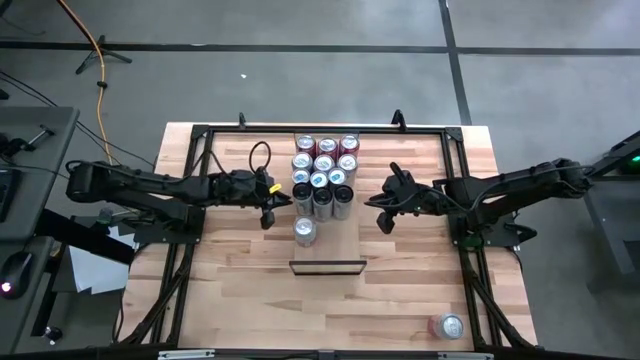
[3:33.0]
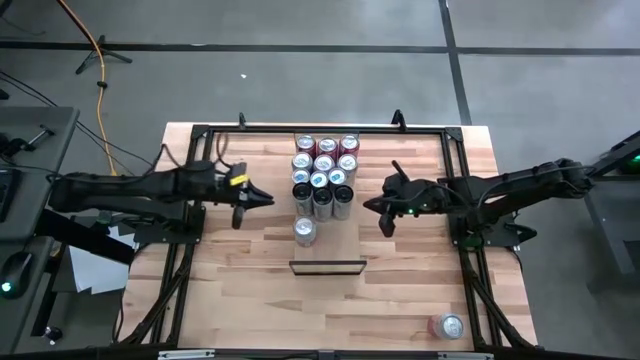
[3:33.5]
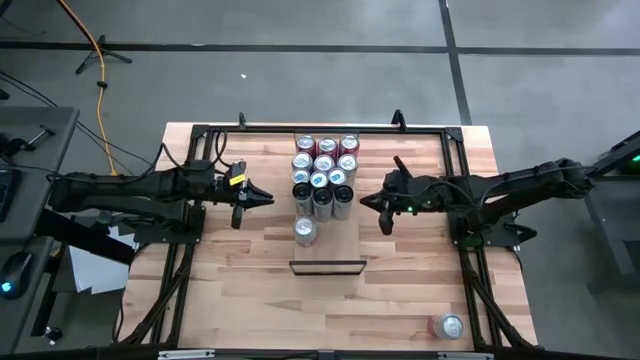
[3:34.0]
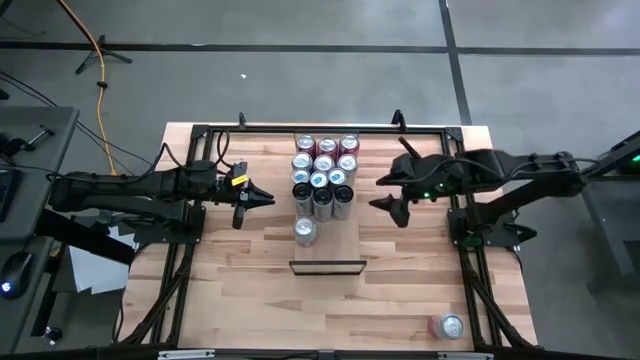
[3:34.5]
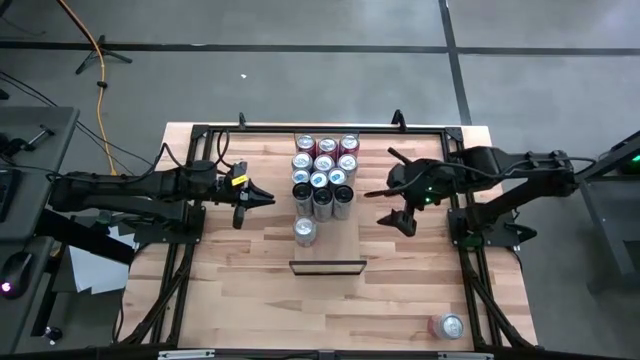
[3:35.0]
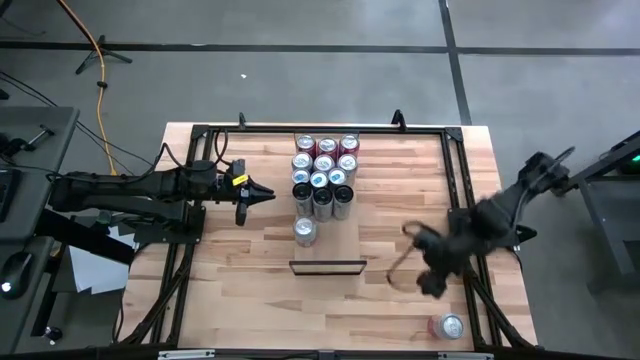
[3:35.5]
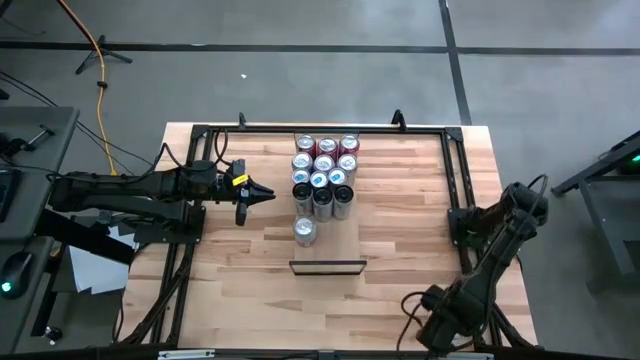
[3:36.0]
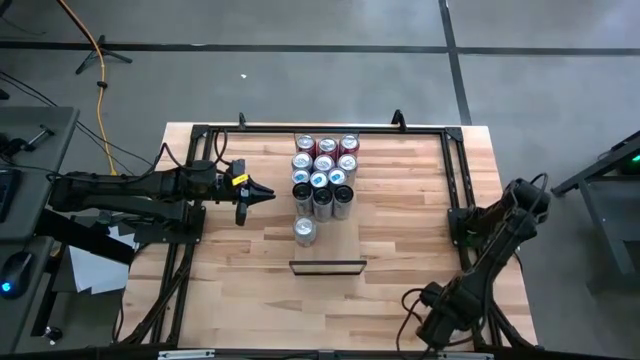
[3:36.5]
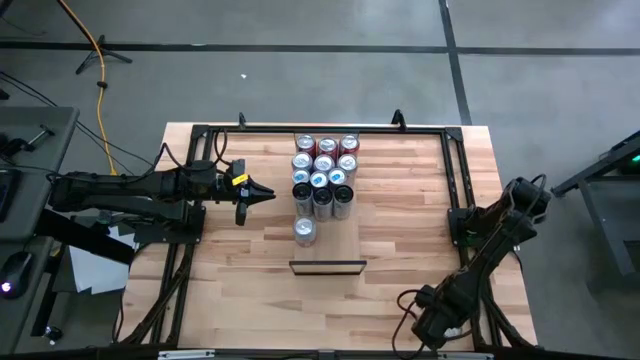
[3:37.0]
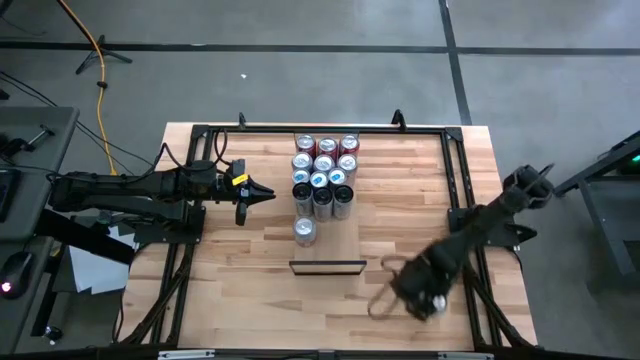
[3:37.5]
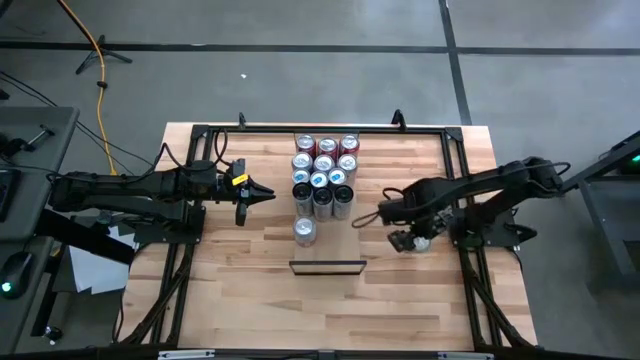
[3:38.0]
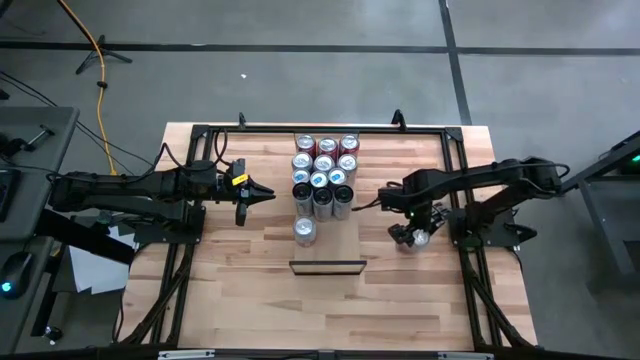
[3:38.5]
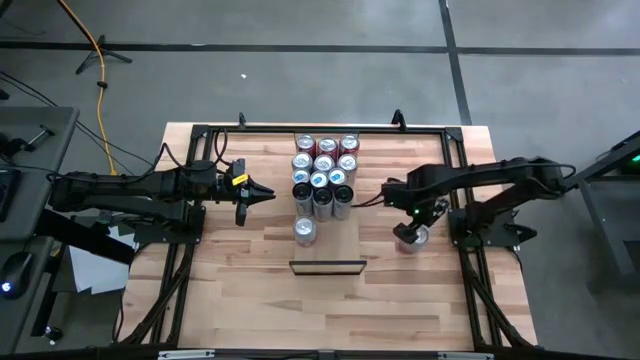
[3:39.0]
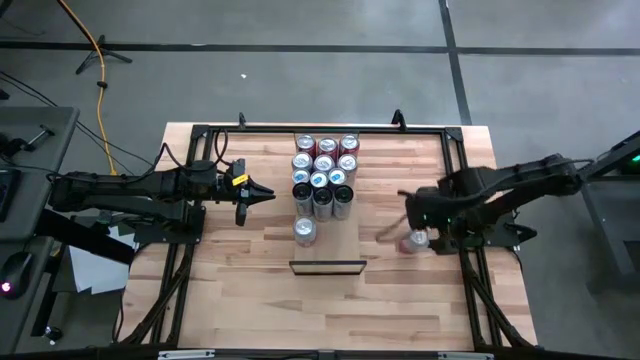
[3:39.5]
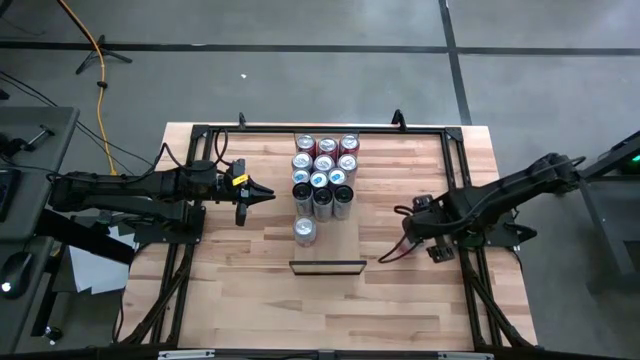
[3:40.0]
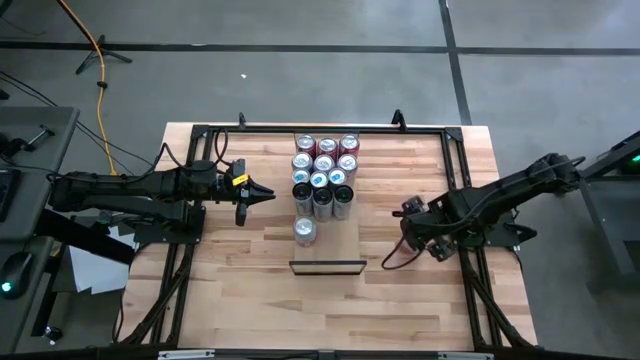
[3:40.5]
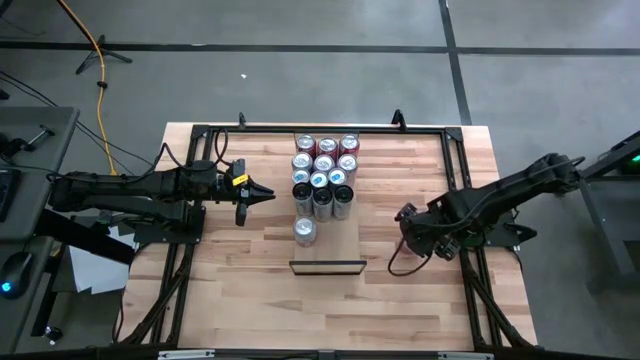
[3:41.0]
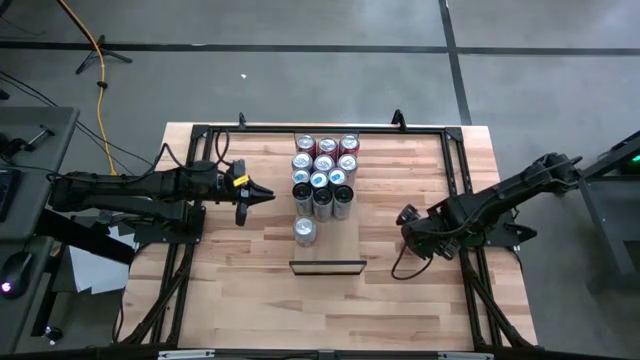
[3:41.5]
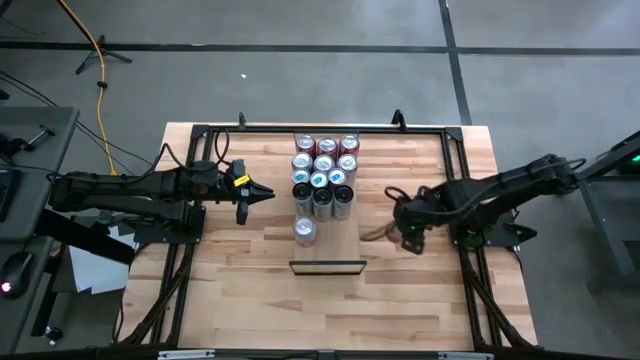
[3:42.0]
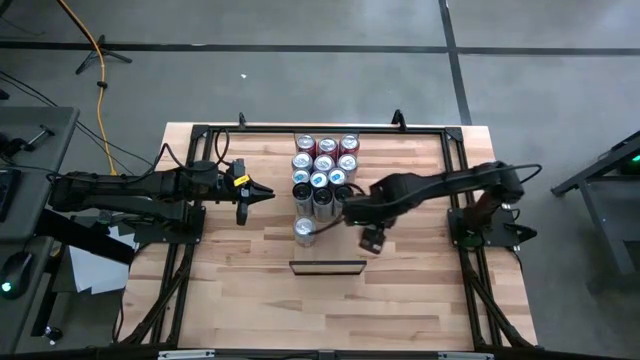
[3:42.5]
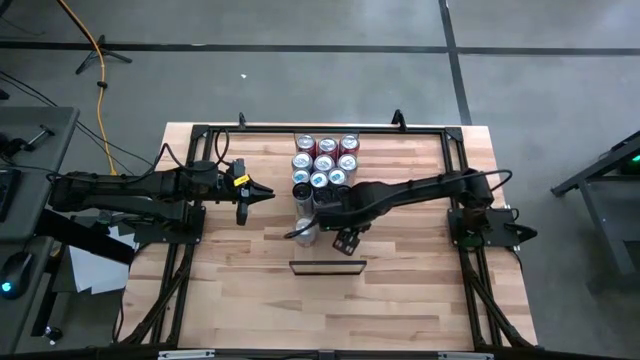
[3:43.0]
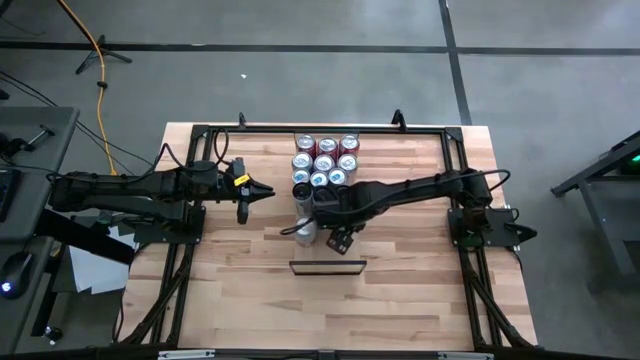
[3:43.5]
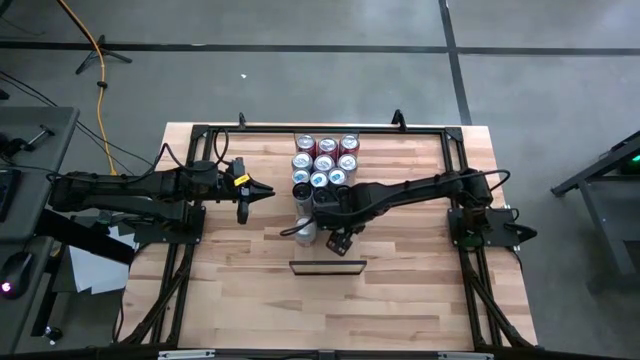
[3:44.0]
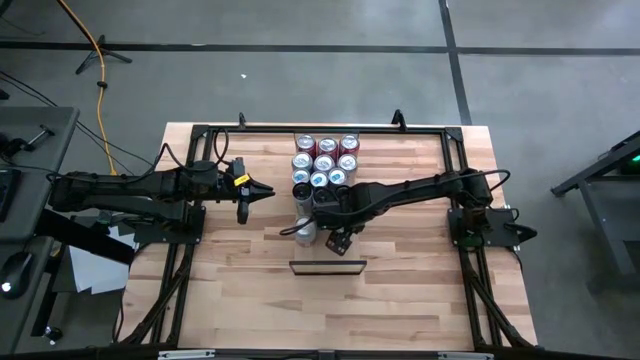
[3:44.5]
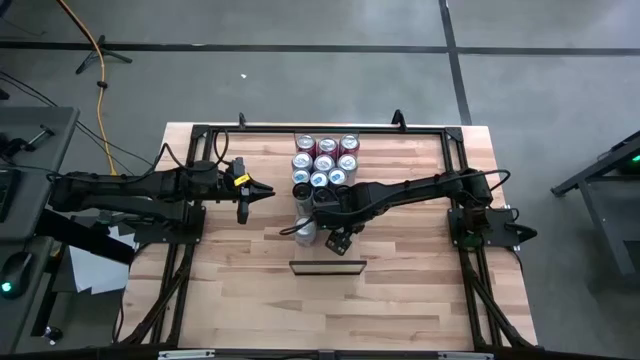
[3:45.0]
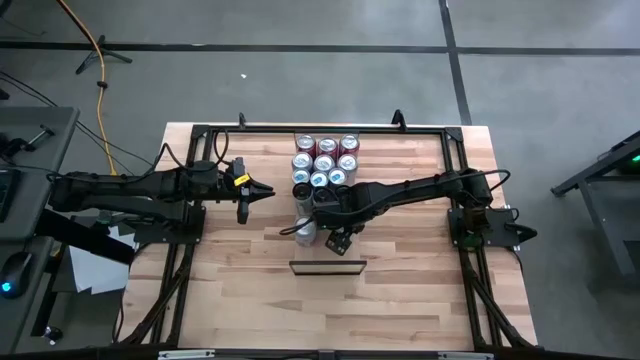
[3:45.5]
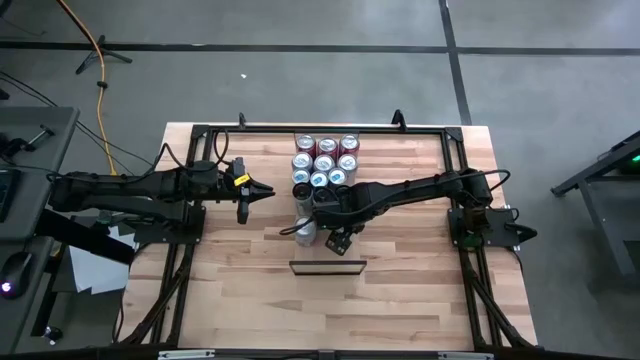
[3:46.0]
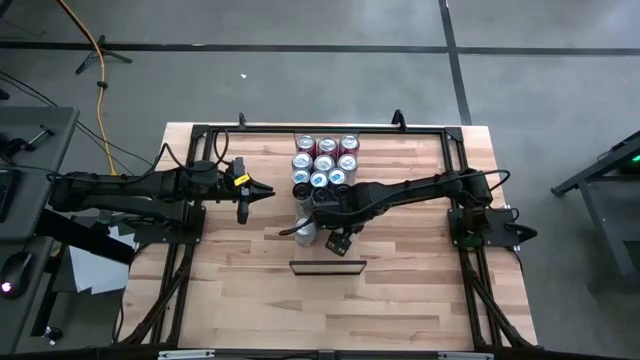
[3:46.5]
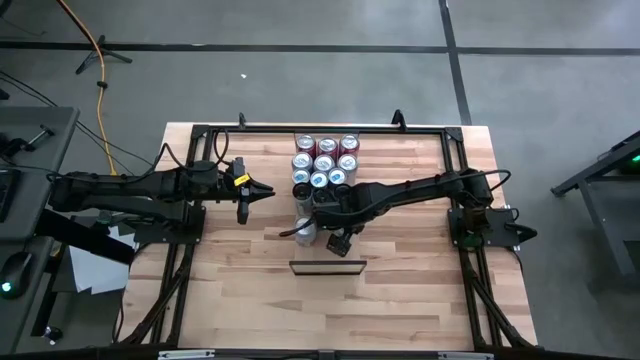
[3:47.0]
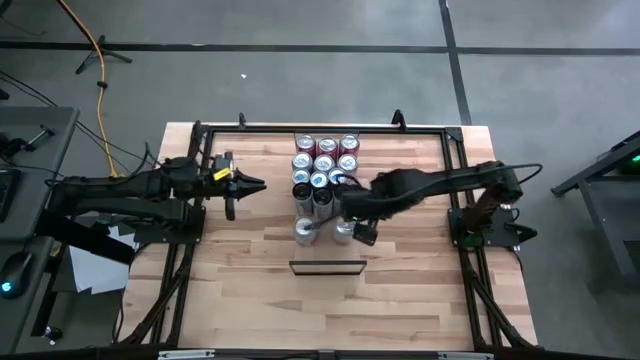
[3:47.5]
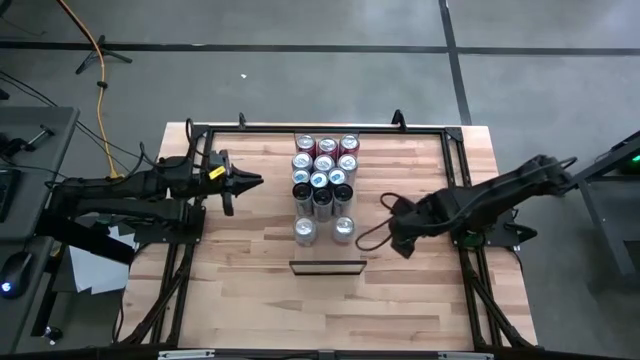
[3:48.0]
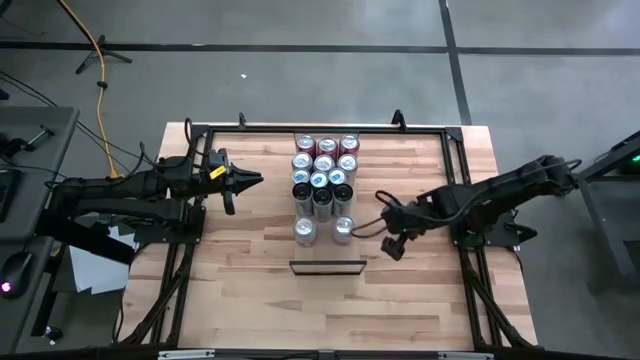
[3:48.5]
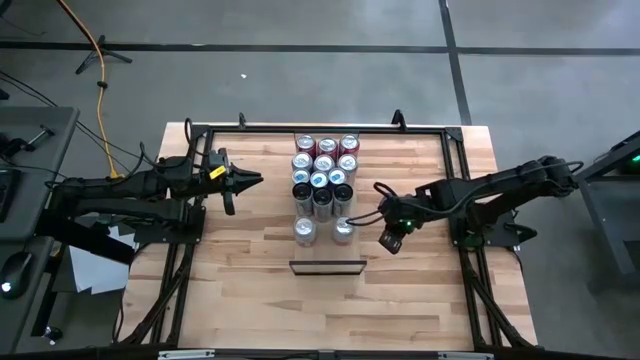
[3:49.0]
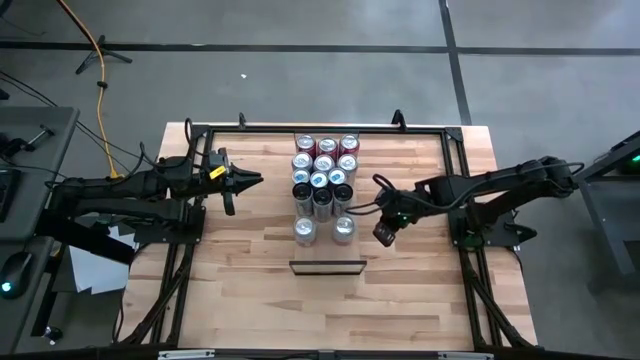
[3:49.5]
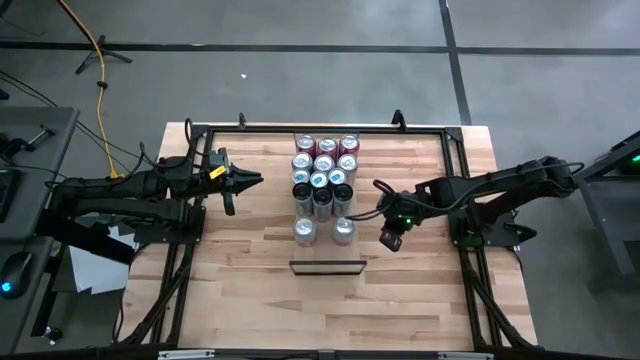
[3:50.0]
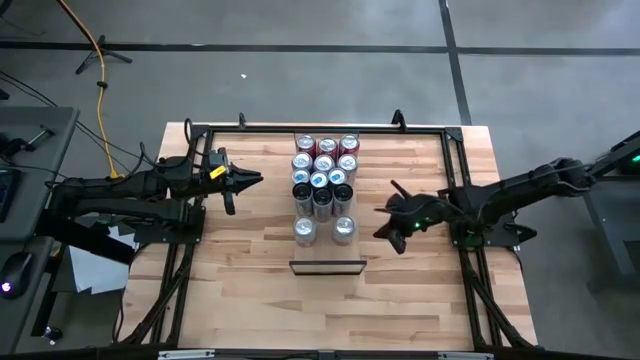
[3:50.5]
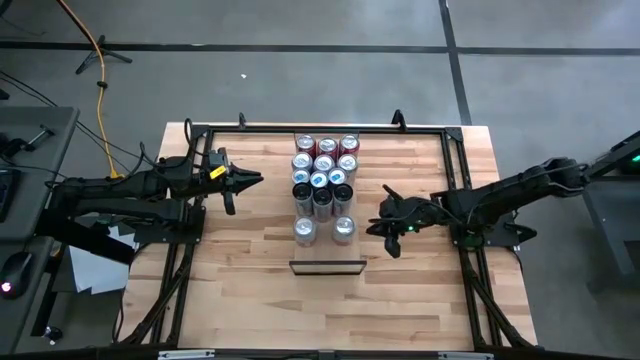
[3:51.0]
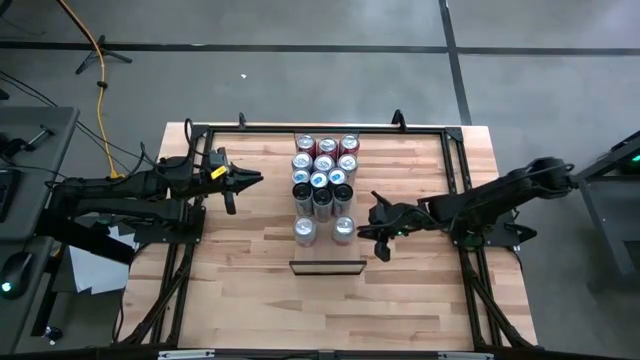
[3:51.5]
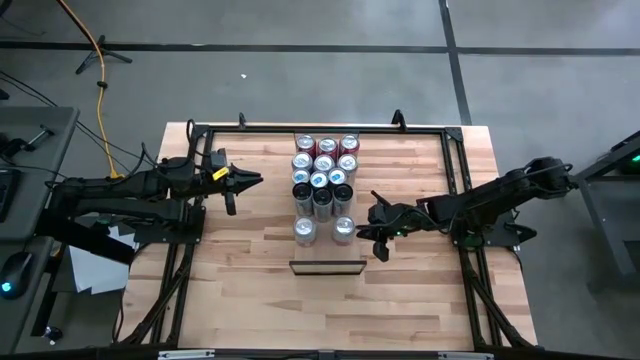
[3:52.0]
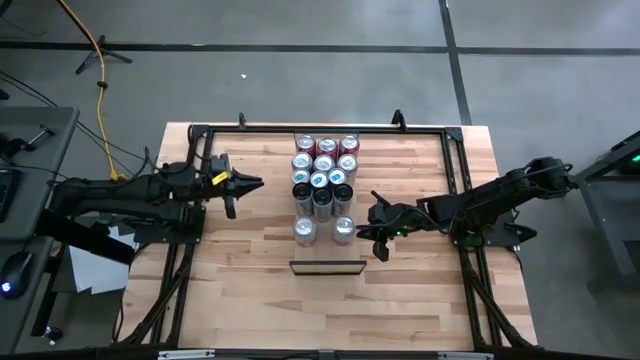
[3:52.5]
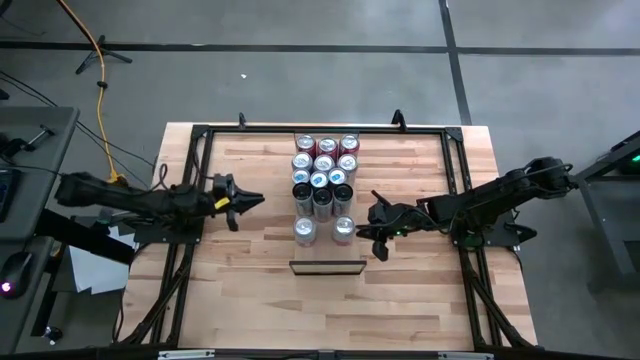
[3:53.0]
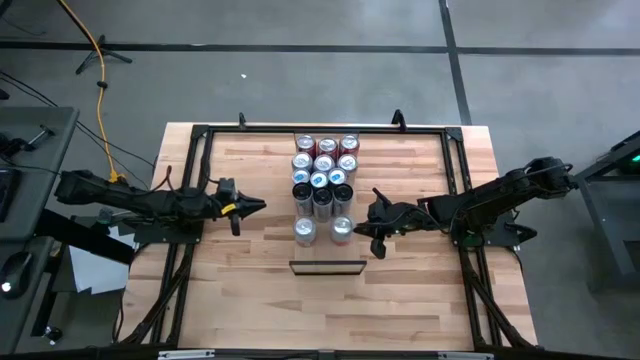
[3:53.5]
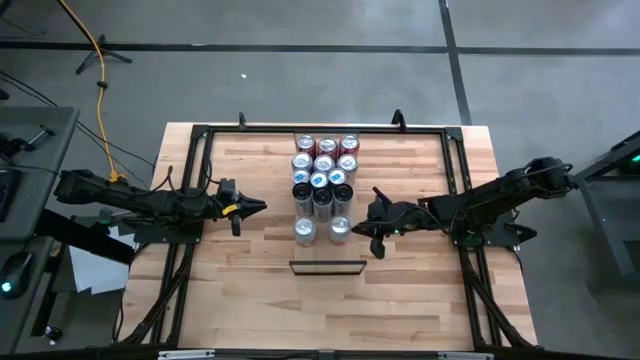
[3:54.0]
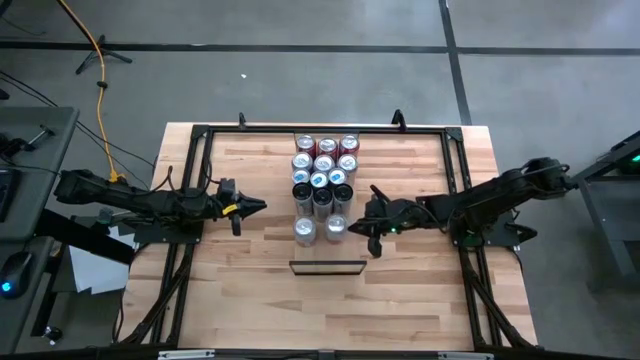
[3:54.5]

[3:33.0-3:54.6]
Task: Place canned beverage on shelf
Put the pink soda can on the shelf aligned with the other pink white soda can
